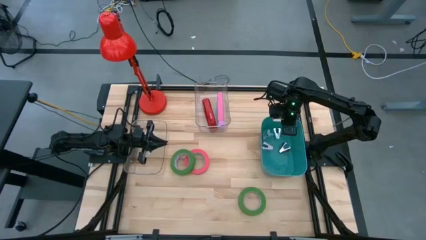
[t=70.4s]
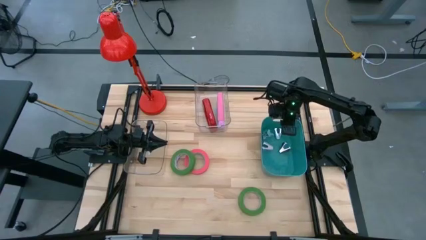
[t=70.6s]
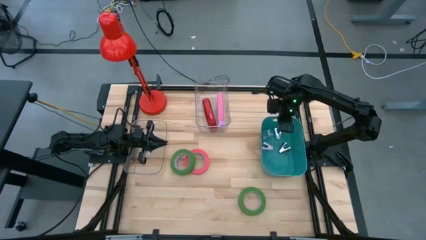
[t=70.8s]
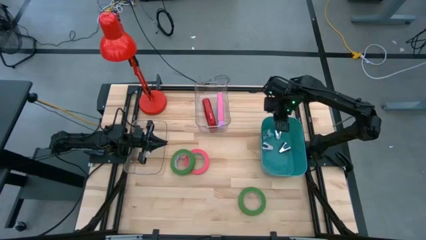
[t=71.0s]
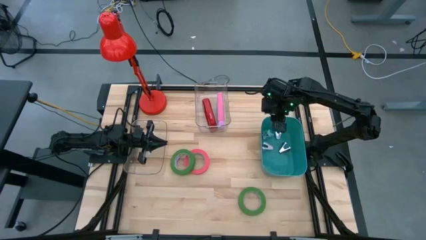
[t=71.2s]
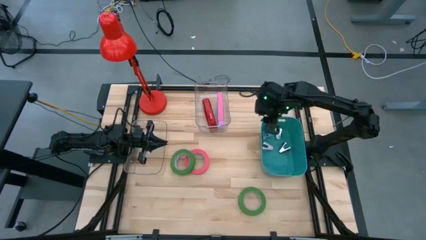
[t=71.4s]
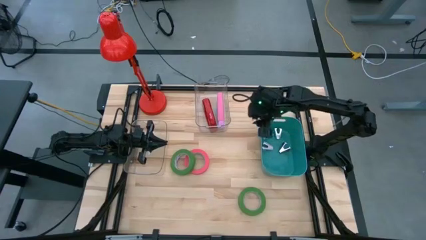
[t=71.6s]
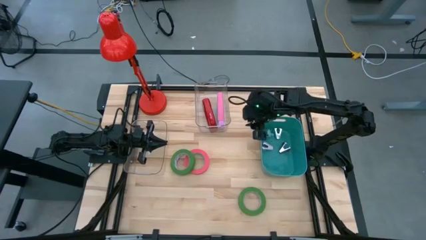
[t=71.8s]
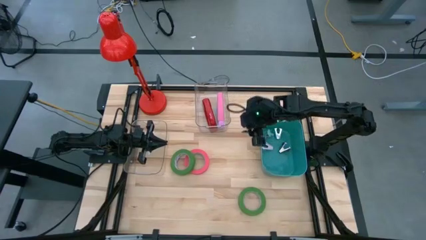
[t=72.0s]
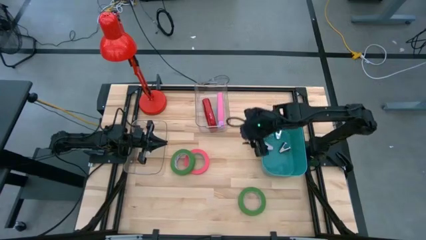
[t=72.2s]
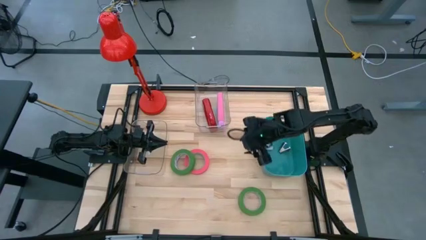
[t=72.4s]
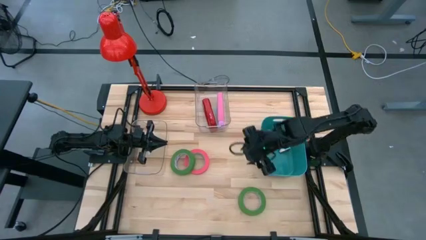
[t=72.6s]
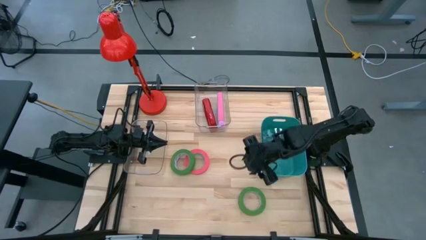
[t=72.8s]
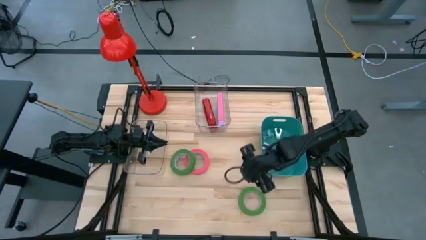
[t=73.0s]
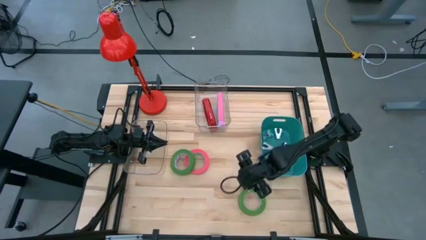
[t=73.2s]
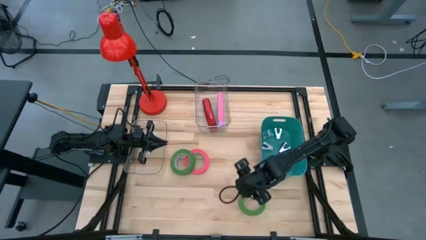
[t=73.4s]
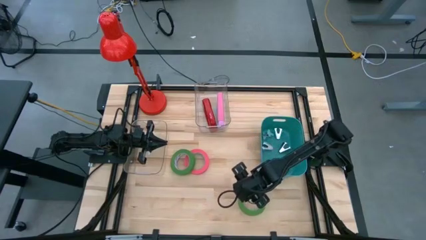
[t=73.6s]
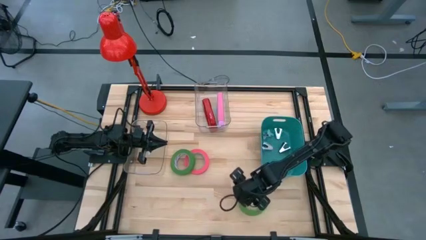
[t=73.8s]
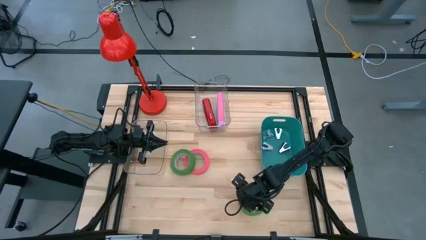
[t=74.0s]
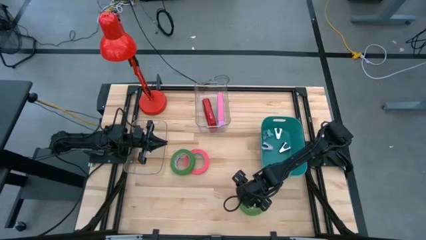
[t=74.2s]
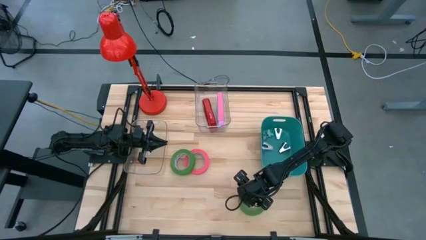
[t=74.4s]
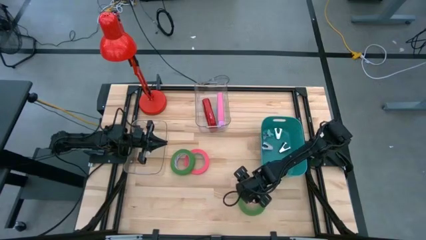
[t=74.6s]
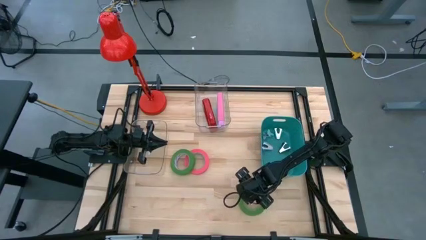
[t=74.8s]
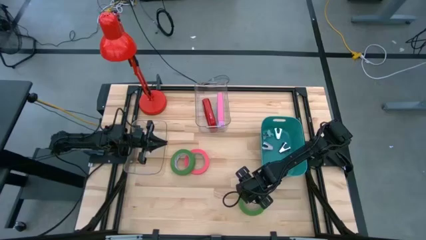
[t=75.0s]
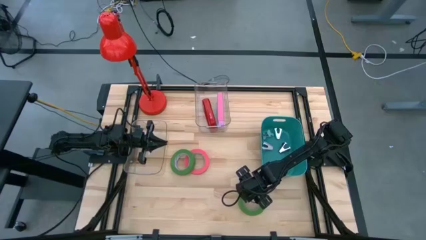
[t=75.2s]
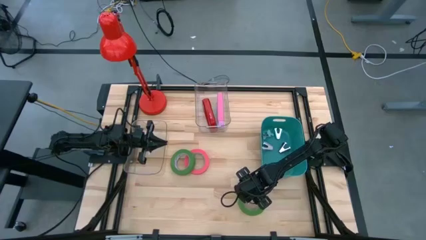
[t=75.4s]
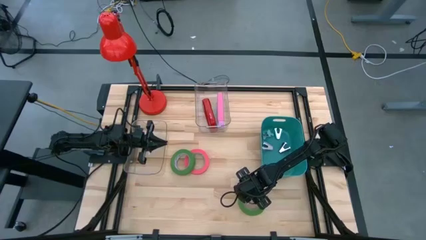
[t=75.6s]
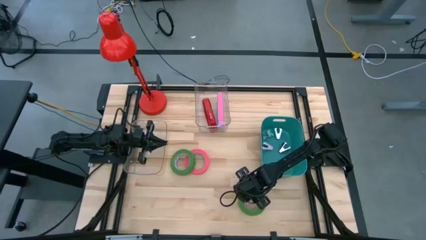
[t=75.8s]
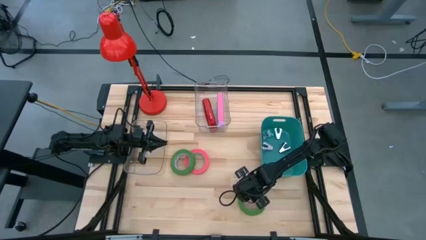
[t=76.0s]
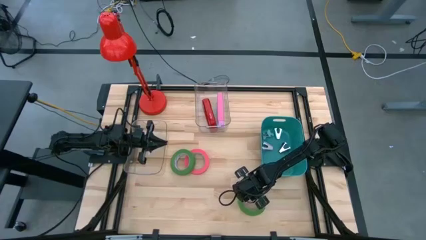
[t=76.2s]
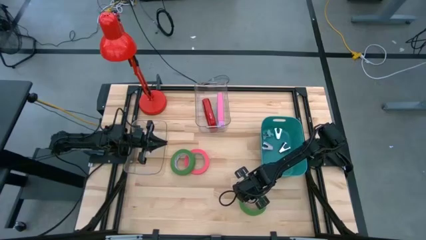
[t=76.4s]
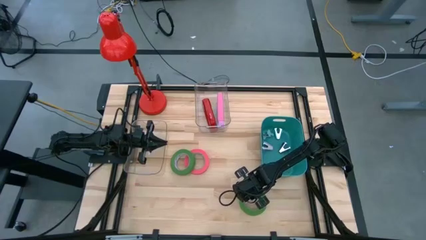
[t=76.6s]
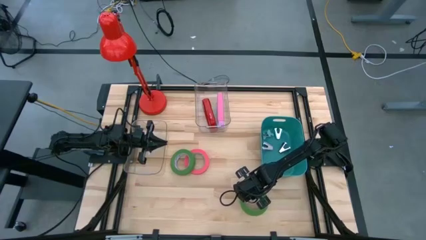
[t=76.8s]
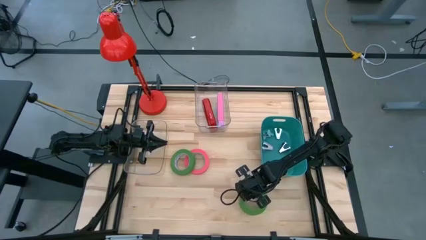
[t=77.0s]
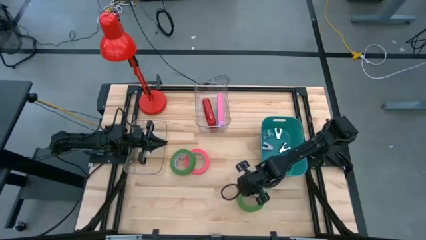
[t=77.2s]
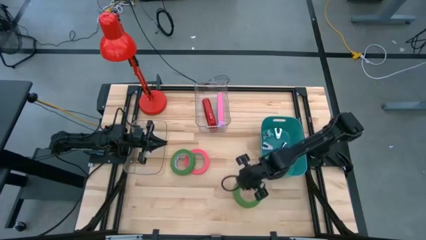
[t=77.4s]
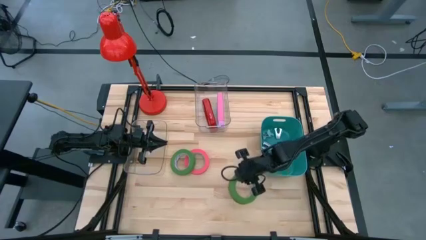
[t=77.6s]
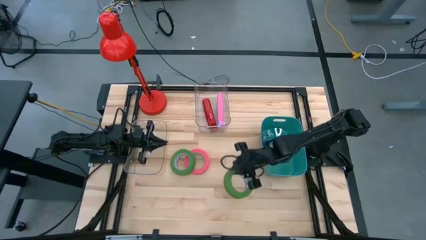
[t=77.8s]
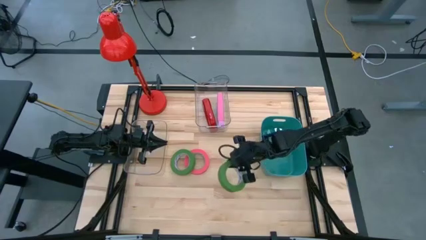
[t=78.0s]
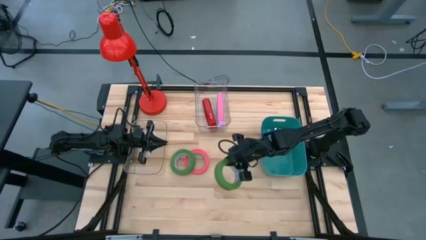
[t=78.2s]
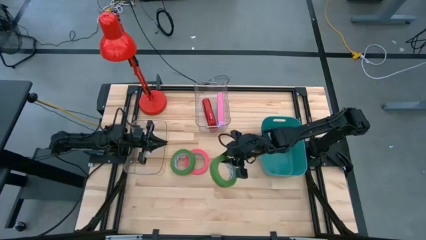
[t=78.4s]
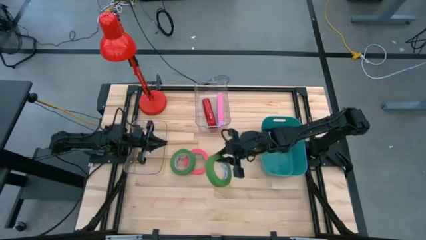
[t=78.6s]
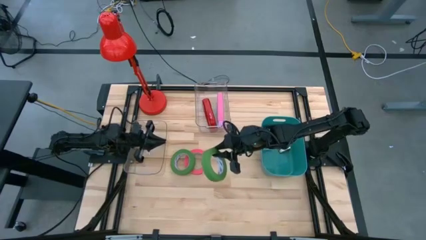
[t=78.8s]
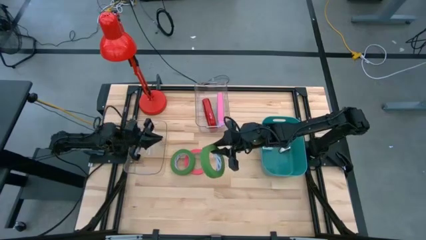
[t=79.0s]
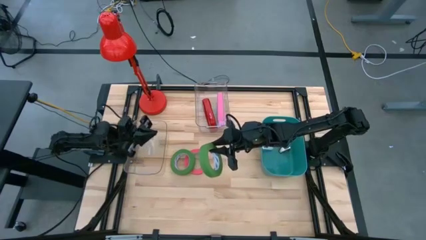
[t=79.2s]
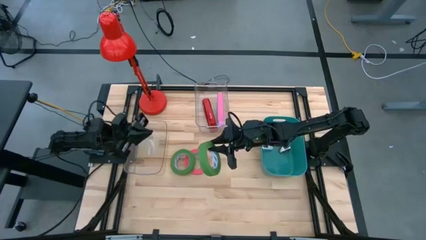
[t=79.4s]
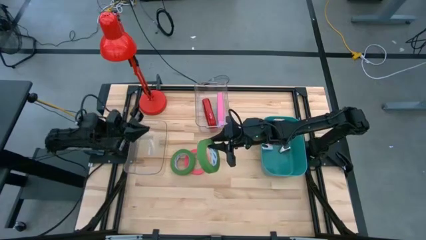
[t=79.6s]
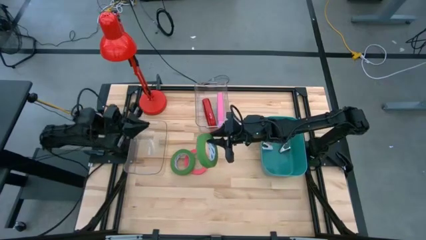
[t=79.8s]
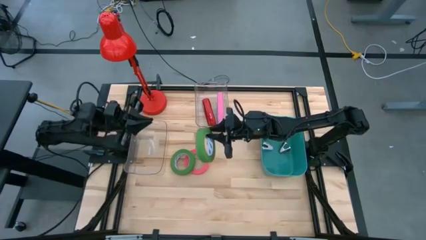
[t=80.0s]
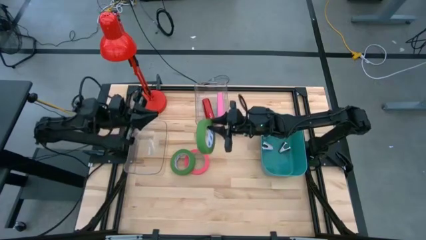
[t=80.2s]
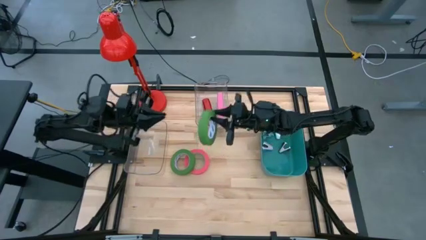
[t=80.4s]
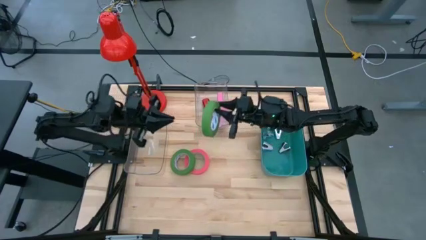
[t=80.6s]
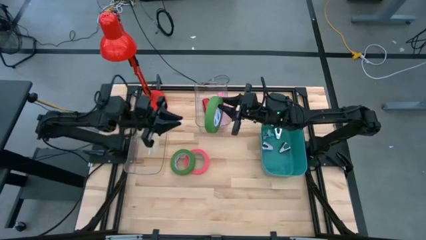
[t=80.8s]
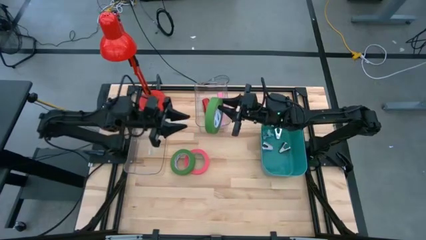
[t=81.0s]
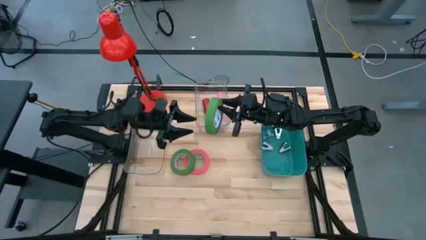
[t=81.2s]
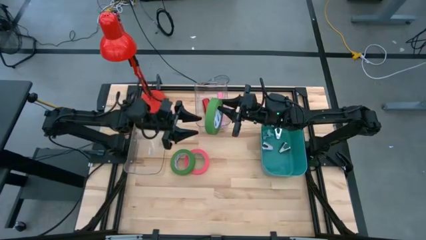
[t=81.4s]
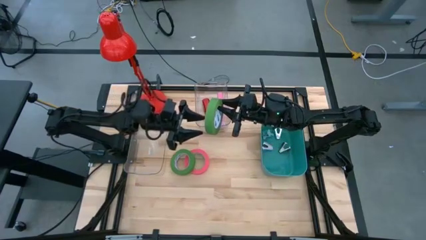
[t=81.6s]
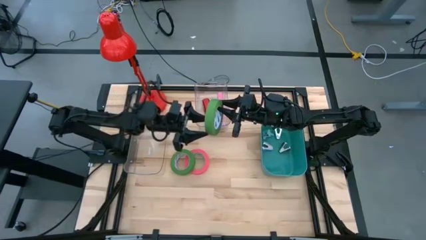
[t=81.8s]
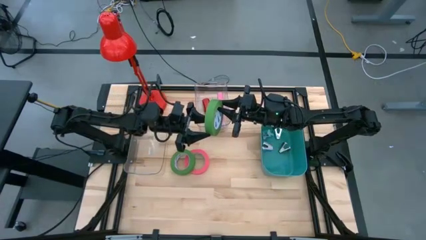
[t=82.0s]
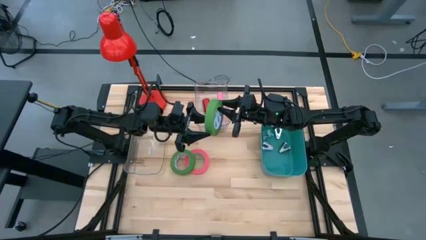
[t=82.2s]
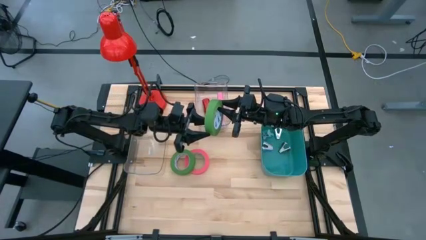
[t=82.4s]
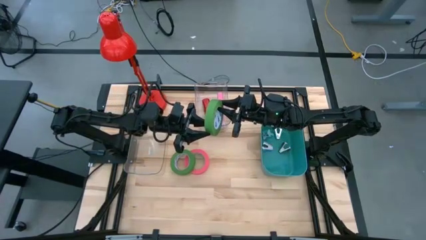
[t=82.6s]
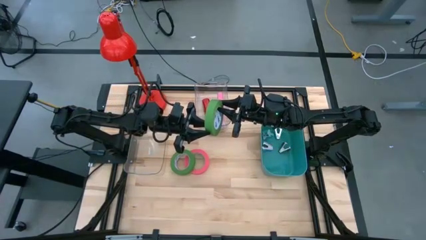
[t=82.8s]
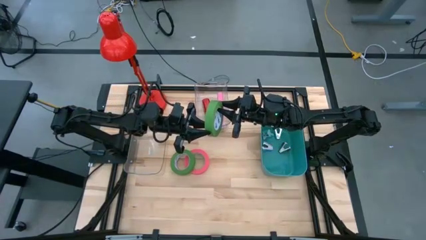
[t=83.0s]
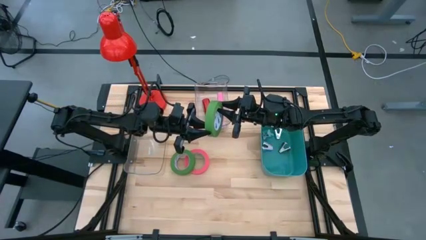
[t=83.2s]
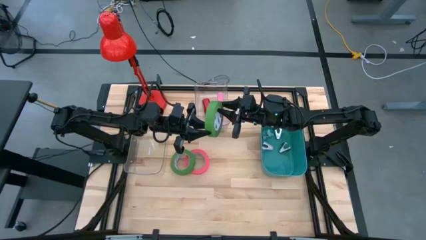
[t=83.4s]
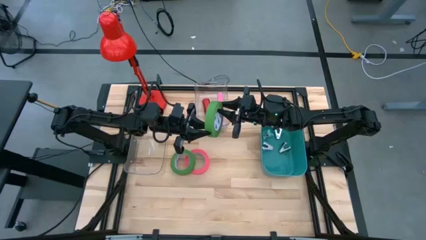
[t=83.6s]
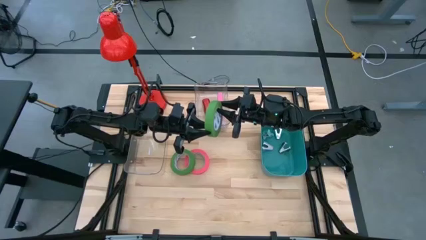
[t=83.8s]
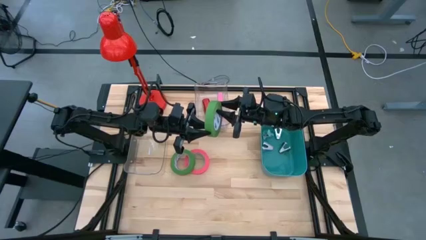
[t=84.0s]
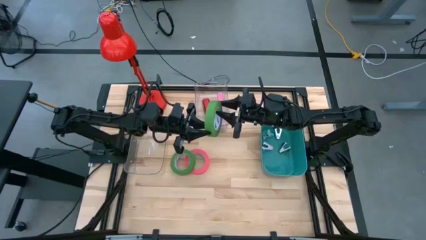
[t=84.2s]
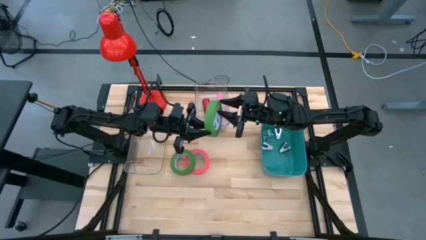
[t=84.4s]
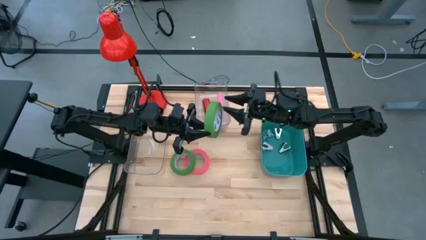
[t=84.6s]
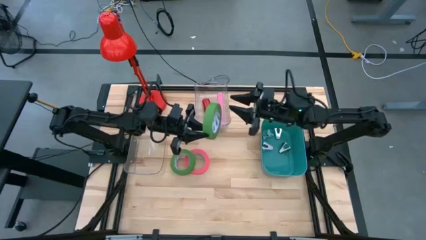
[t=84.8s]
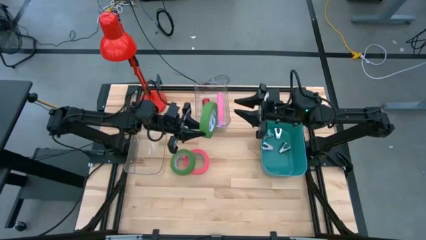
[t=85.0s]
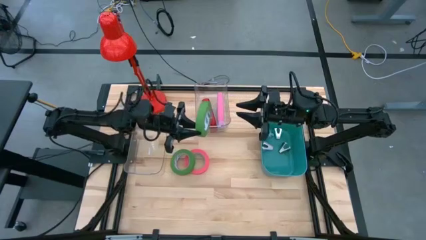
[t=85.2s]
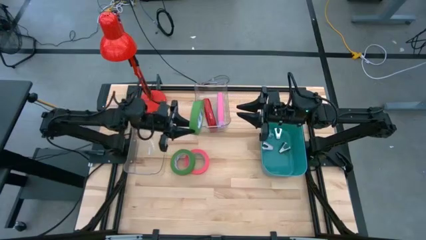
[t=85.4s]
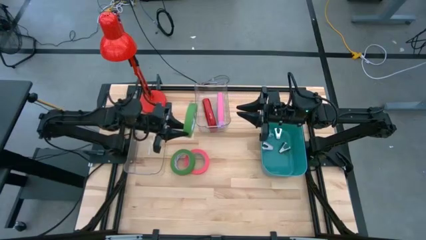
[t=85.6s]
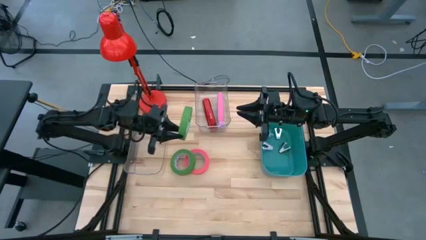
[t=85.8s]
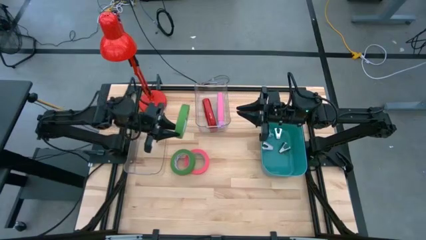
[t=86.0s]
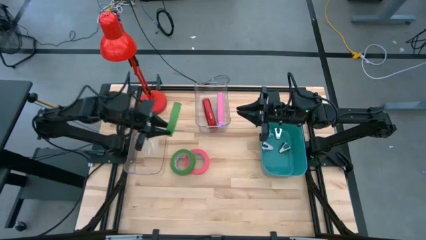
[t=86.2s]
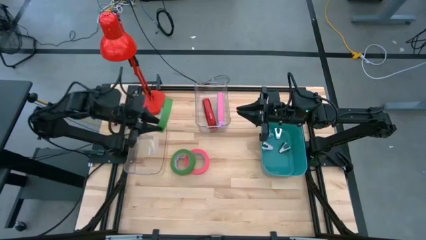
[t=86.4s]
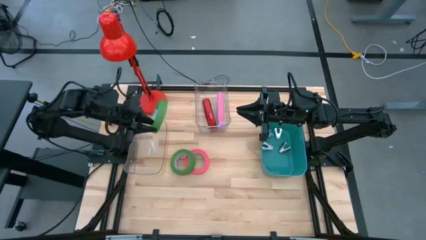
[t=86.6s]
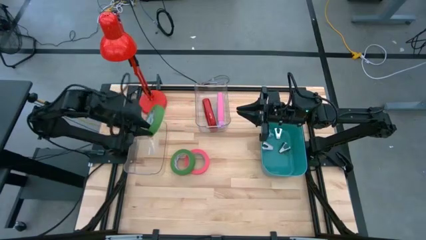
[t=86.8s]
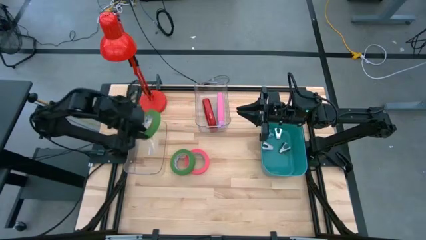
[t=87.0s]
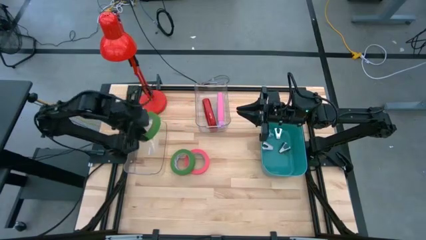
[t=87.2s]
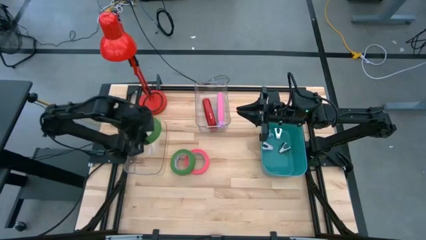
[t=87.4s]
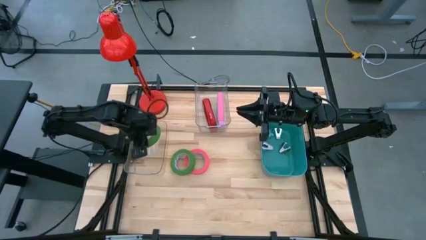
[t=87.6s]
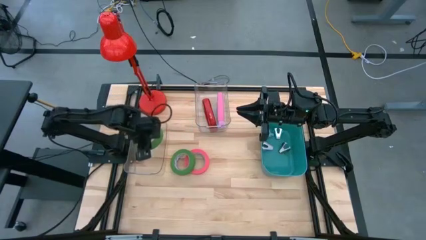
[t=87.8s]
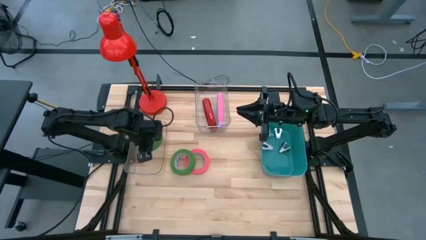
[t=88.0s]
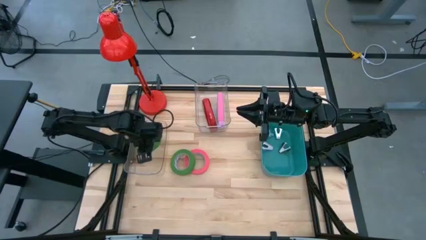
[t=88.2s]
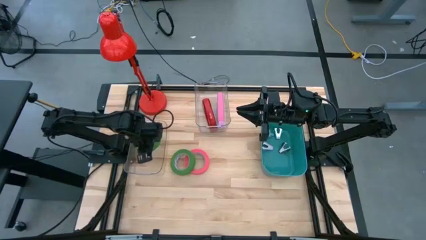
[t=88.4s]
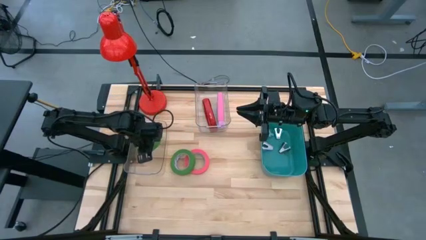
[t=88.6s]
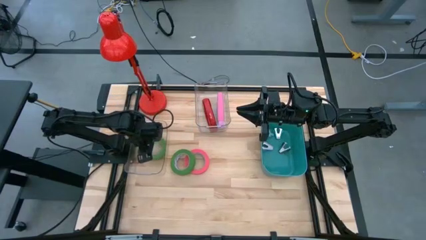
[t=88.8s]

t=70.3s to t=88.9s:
Task: Pick and place Stapler, Stapler remover, tape
Put the bottom green tape into the left transparent bin
